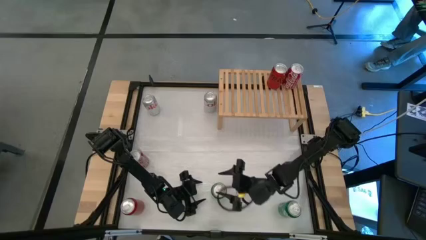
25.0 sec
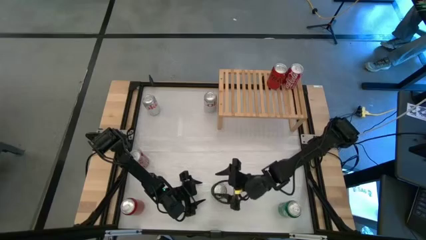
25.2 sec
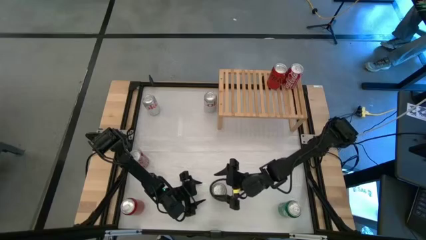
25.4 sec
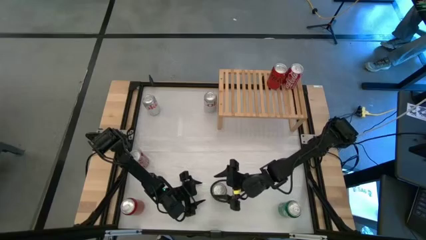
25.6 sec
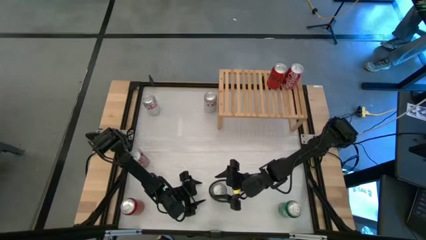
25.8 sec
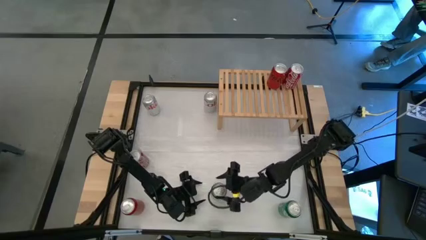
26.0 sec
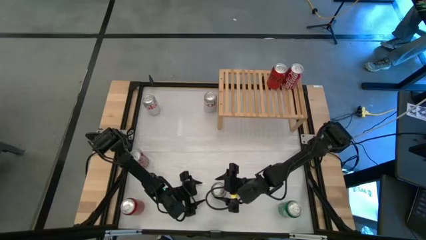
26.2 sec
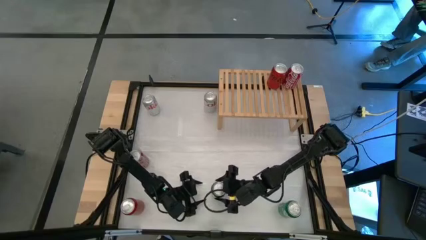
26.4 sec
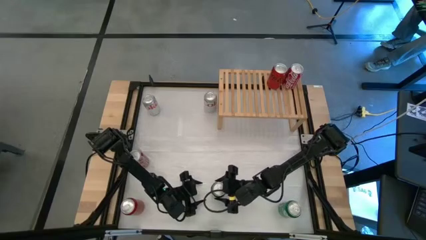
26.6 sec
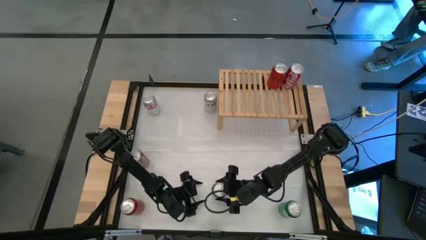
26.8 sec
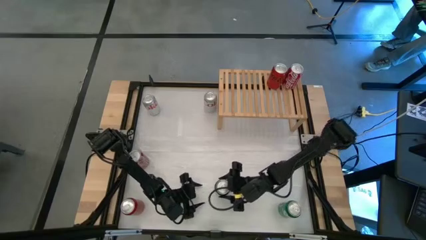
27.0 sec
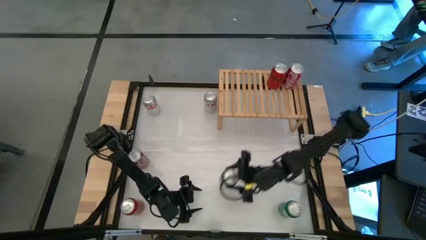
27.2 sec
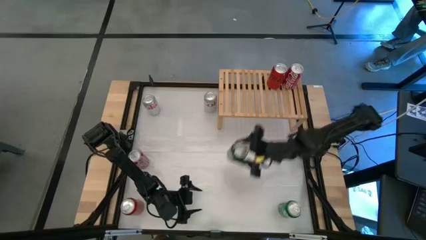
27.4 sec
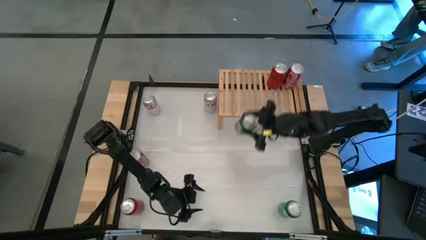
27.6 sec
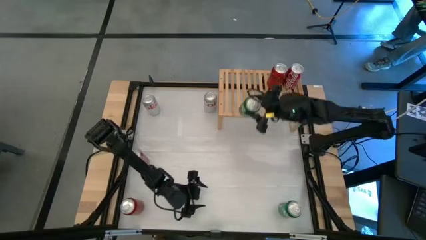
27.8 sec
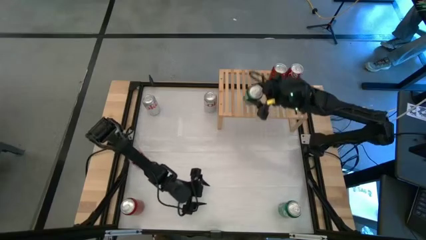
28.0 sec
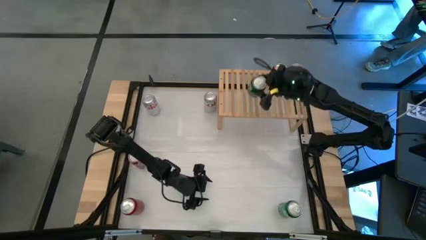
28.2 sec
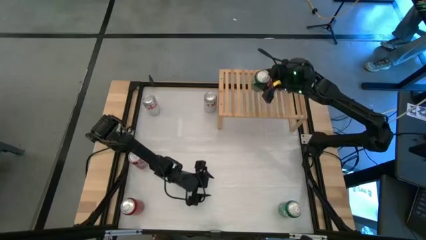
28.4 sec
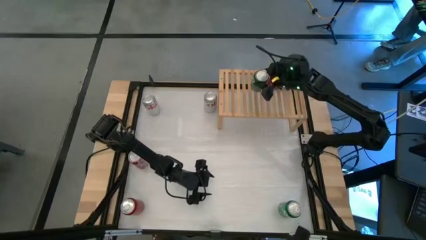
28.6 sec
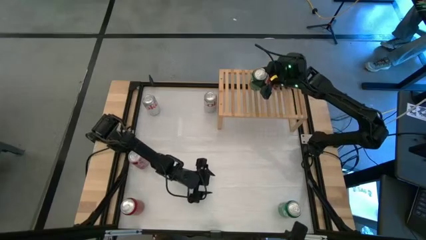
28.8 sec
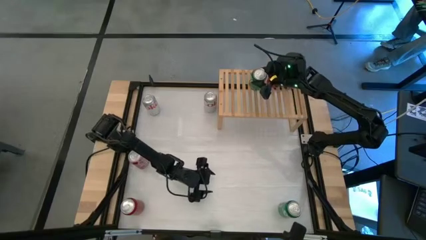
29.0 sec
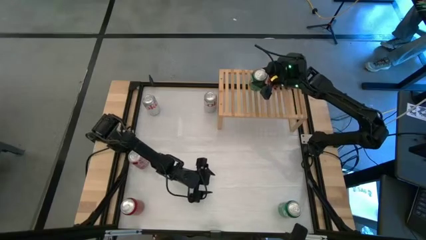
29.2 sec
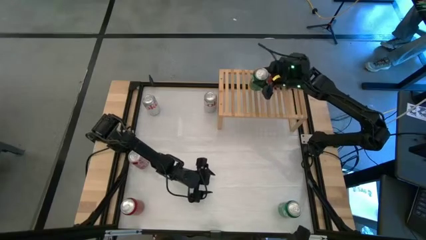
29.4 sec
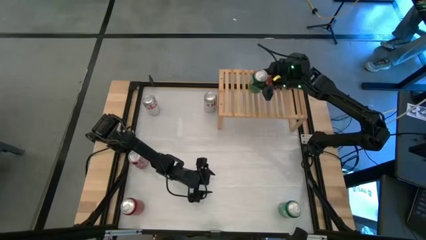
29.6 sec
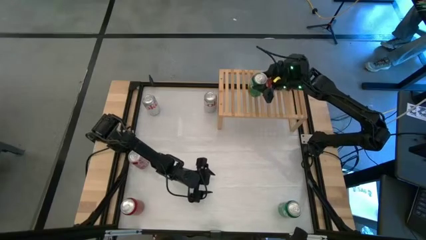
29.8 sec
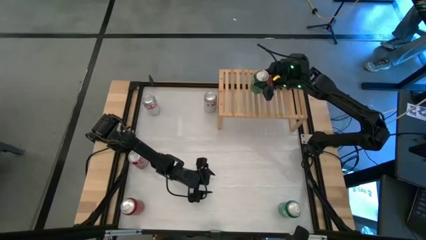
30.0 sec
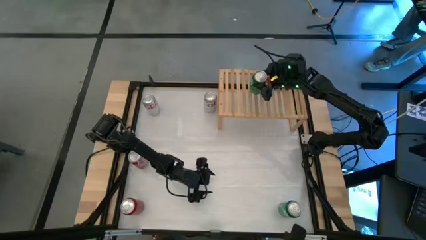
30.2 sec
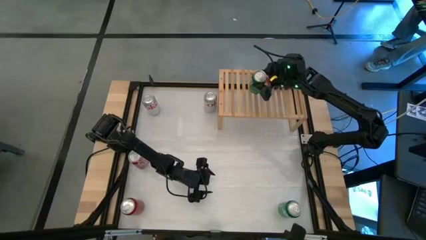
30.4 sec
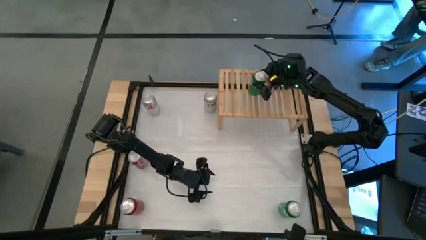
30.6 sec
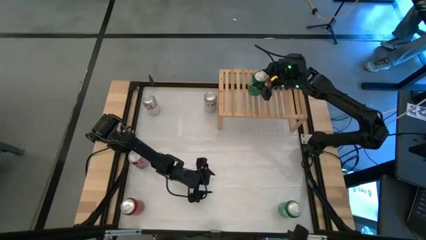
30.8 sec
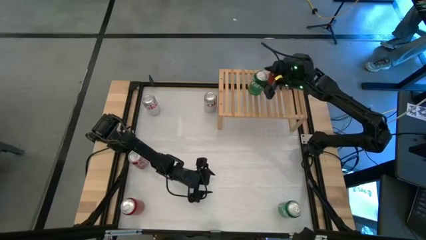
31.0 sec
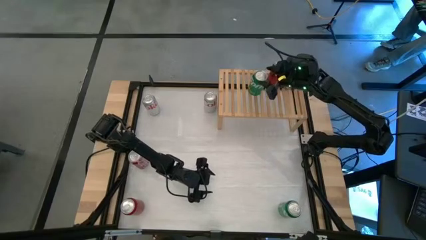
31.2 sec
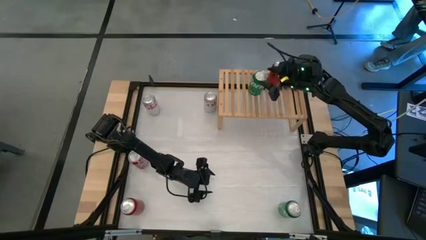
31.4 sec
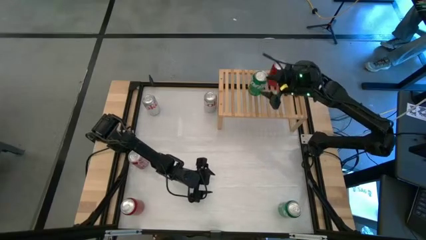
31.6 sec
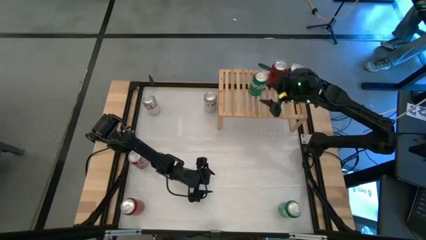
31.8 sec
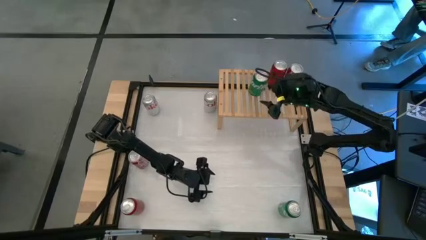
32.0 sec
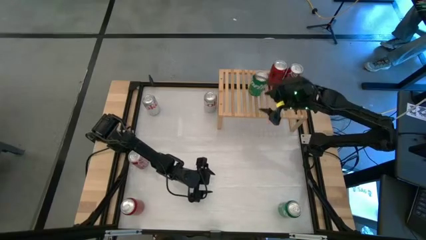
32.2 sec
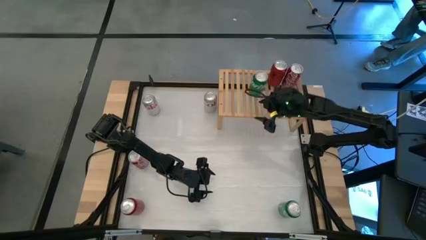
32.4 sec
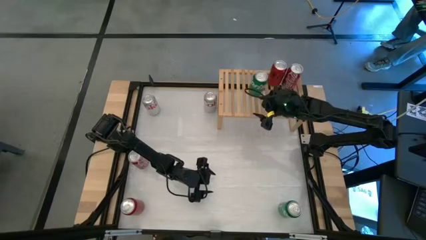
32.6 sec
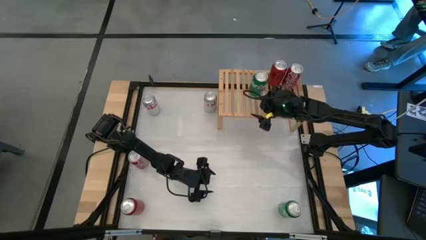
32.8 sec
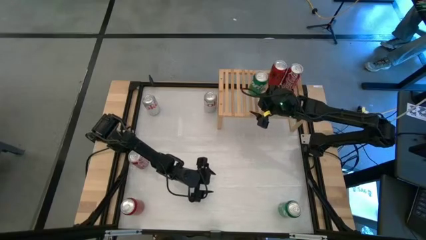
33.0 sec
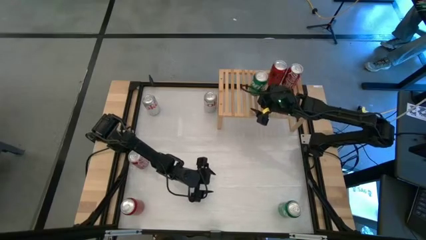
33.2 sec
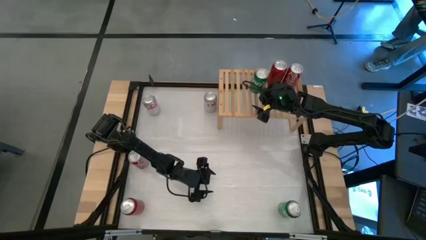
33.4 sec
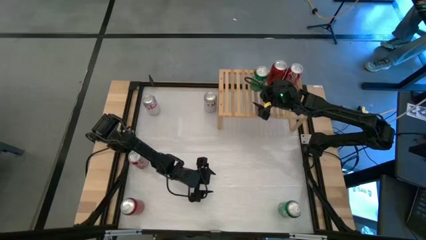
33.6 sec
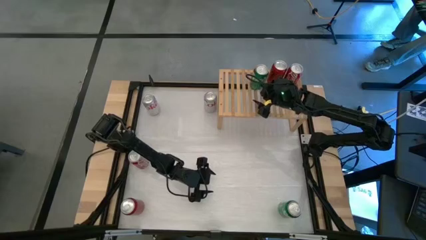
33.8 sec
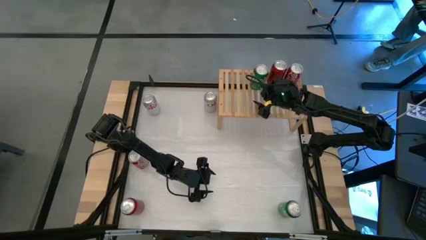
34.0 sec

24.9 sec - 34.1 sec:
Task: Place canned beverage on shelf
Put the left green soda can on the shelf

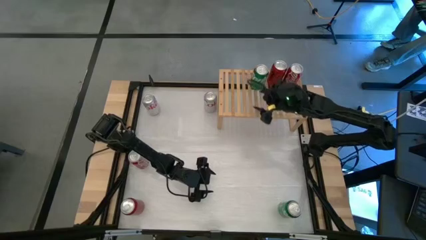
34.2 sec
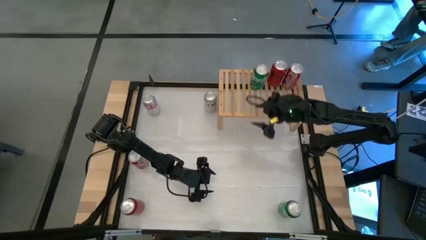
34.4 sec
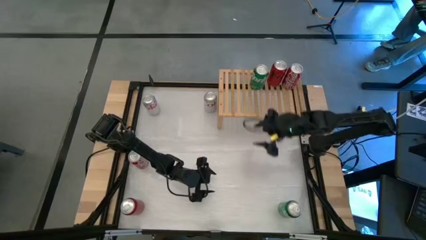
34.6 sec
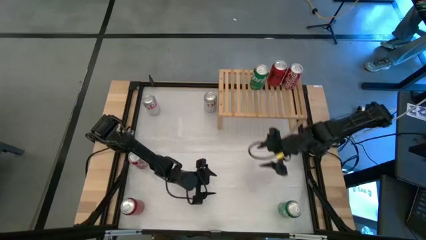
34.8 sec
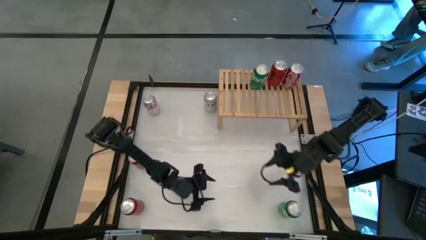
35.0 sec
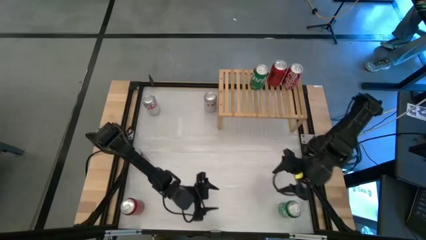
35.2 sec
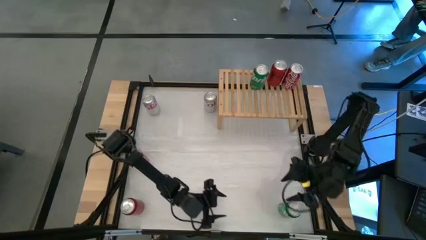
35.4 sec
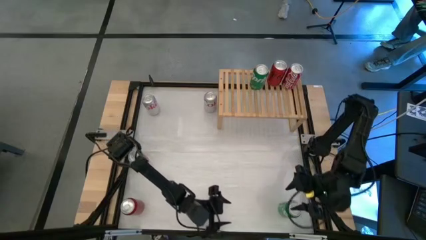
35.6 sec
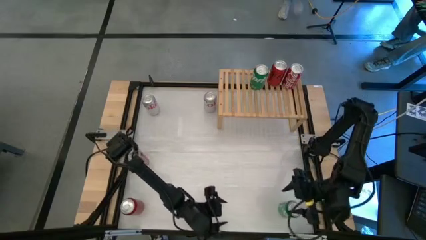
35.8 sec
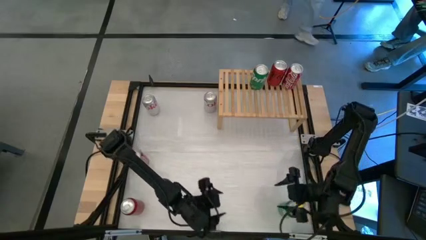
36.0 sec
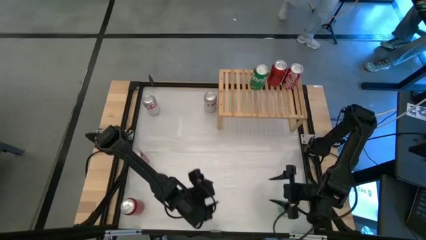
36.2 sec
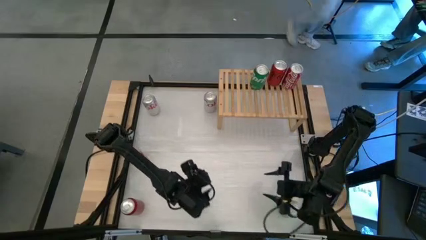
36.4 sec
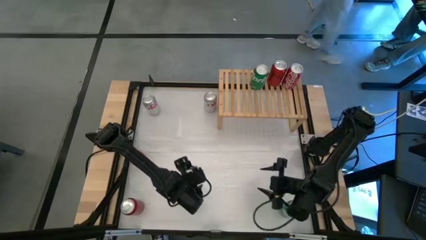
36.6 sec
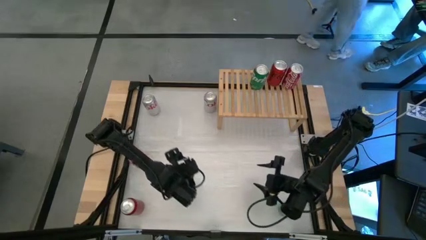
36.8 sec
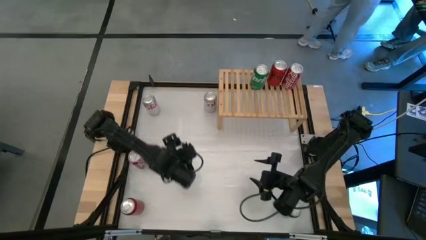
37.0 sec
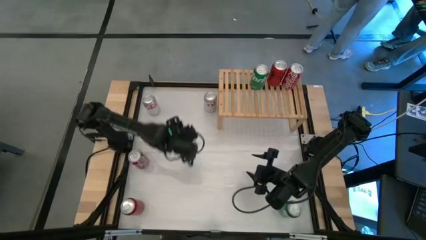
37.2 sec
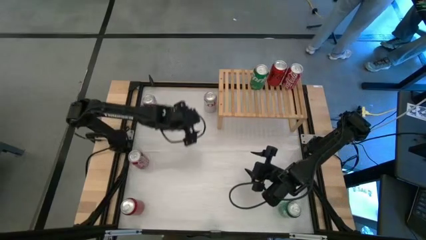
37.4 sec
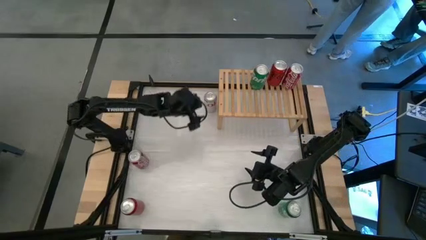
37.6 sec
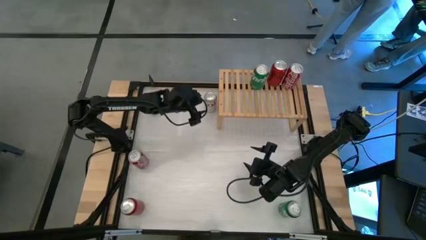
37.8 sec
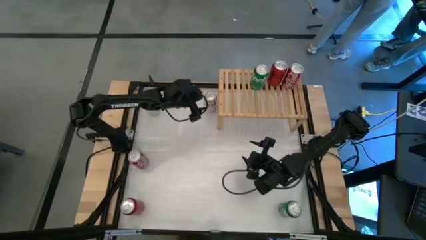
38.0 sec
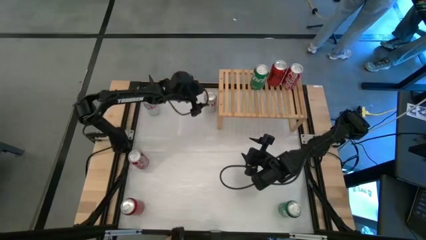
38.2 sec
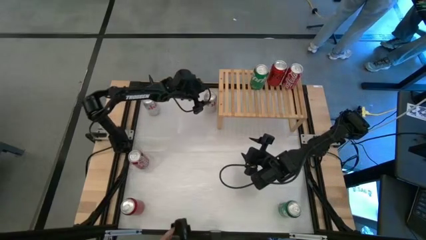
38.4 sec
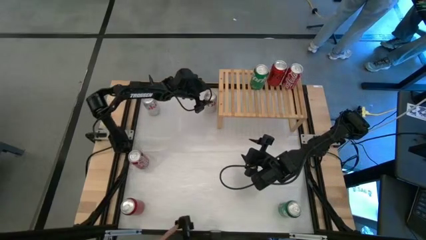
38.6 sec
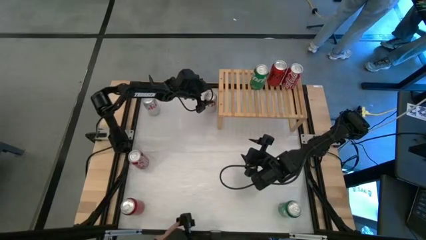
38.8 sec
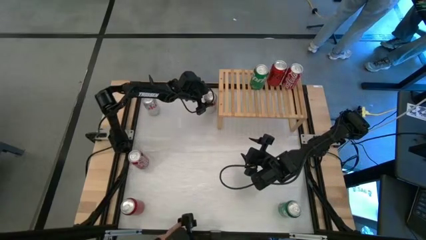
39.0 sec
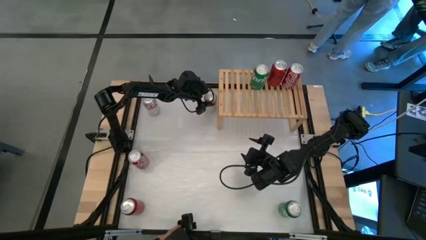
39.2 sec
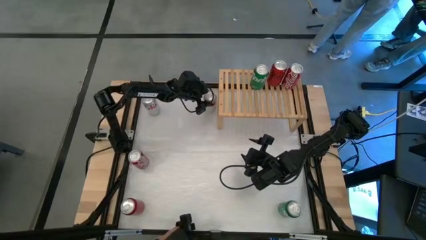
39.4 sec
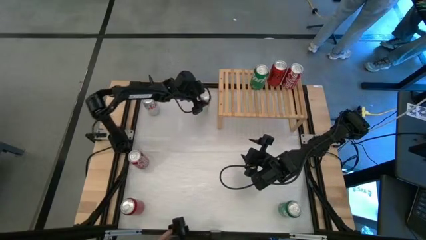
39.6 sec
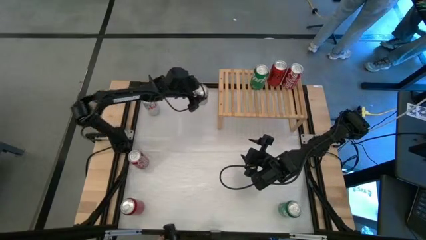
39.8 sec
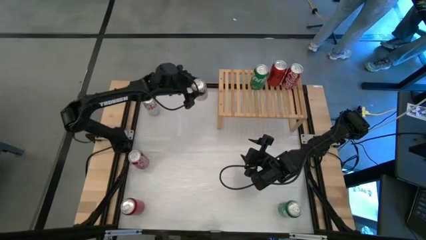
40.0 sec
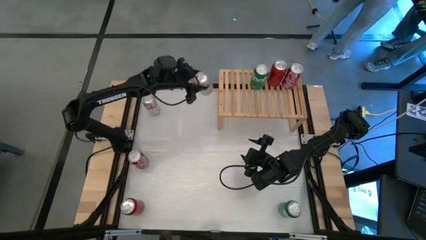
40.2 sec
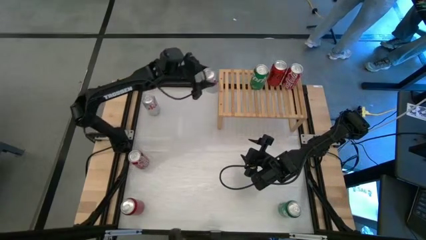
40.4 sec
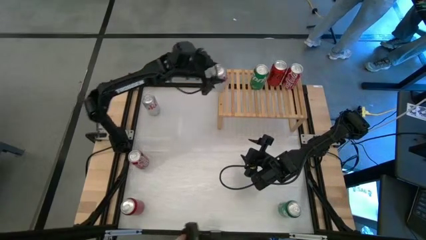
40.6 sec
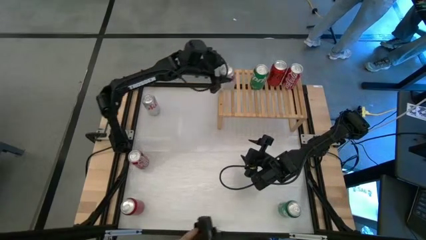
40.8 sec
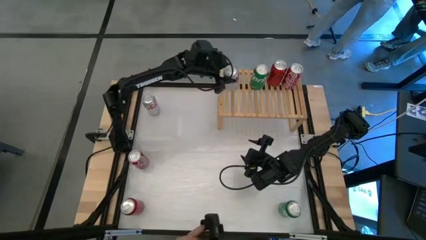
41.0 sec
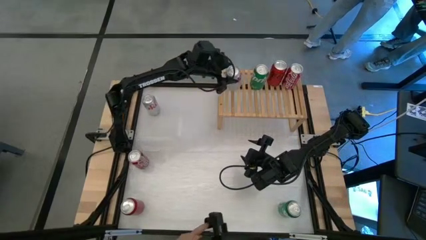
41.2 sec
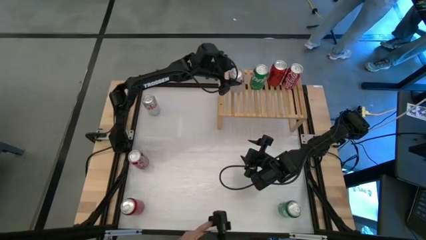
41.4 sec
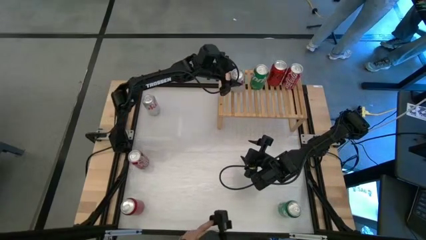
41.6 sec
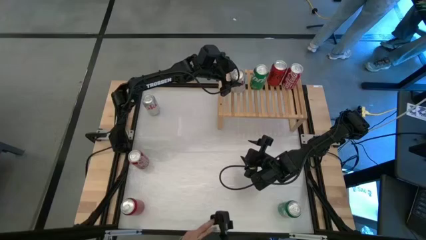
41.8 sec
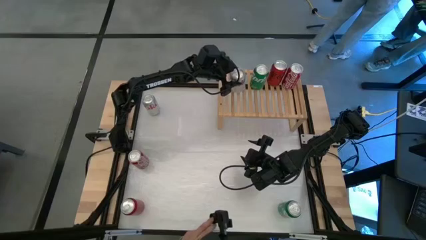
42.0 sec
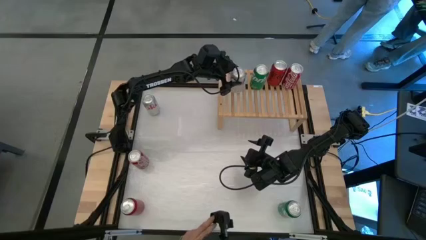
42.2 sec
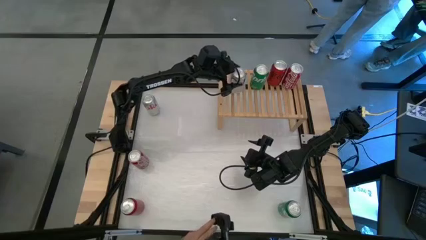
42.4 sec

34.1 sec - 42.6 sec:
Put the right silver soda can on the shelf
